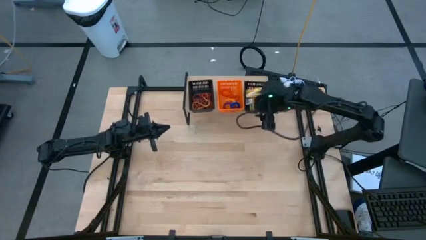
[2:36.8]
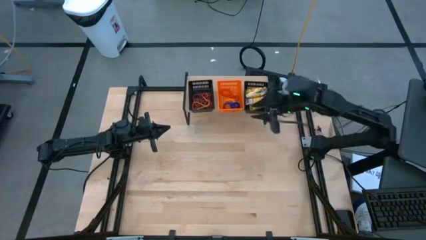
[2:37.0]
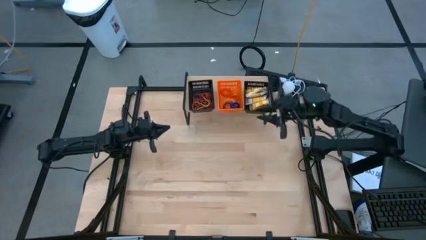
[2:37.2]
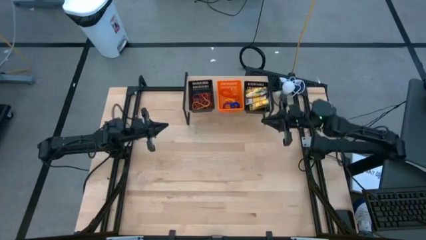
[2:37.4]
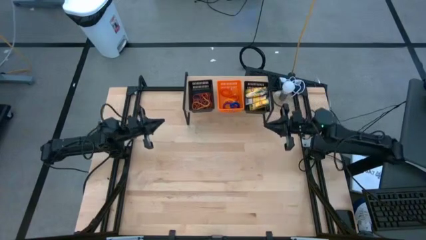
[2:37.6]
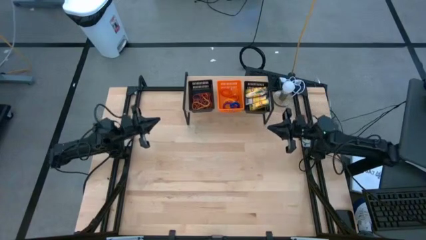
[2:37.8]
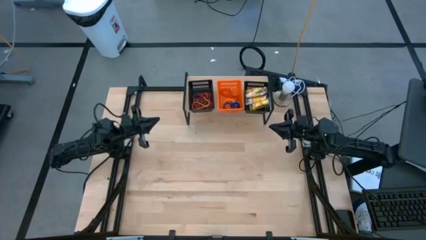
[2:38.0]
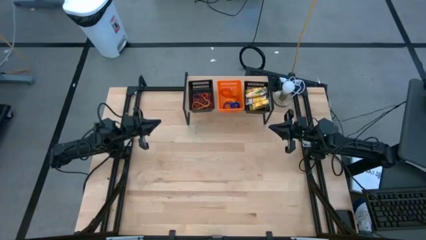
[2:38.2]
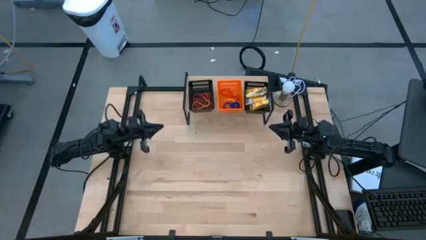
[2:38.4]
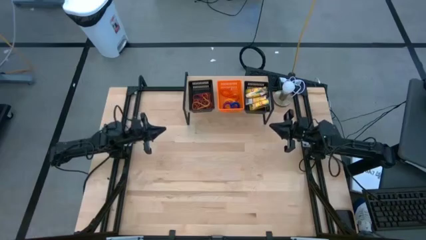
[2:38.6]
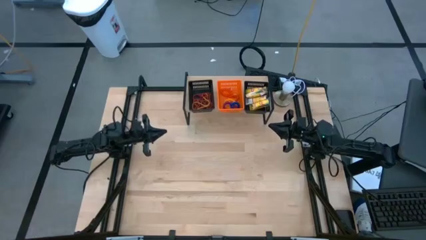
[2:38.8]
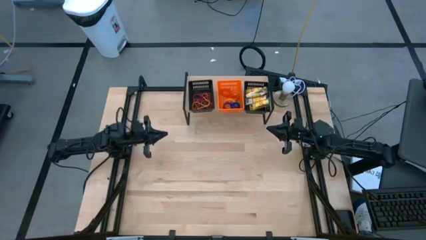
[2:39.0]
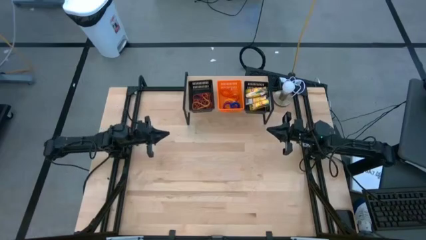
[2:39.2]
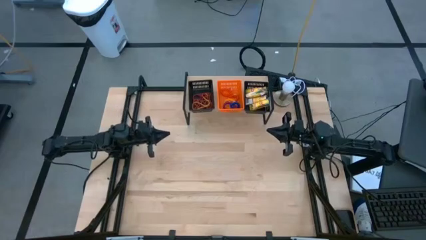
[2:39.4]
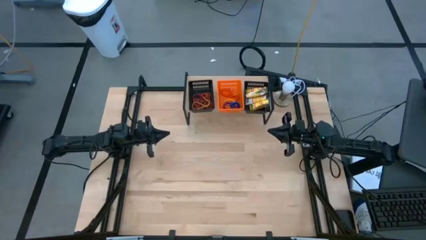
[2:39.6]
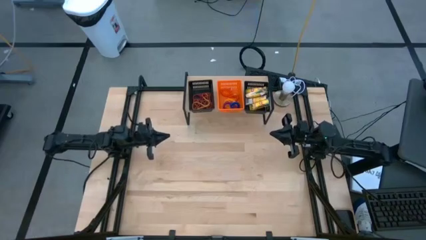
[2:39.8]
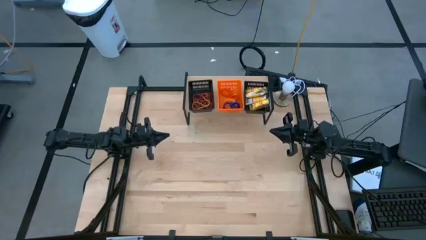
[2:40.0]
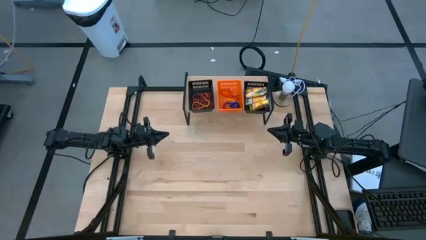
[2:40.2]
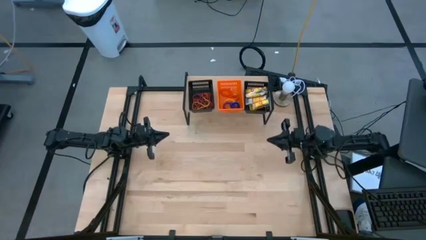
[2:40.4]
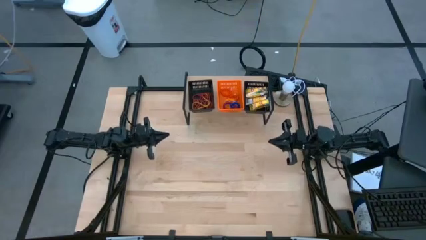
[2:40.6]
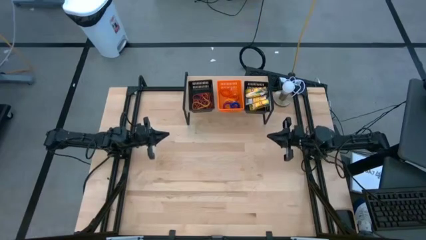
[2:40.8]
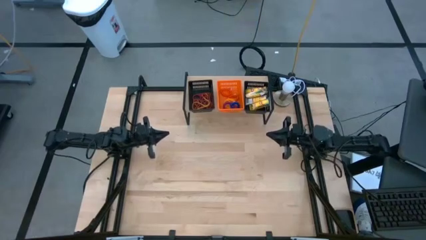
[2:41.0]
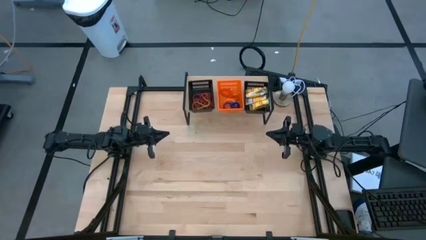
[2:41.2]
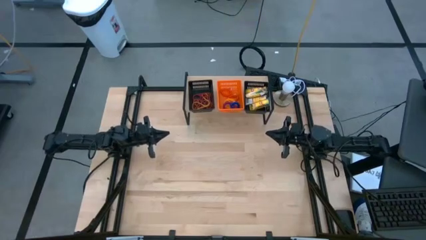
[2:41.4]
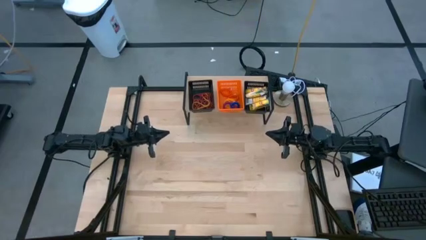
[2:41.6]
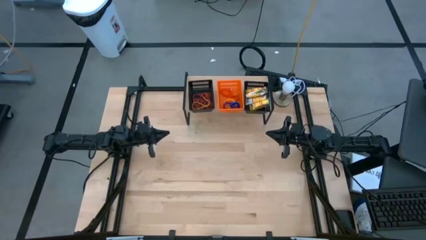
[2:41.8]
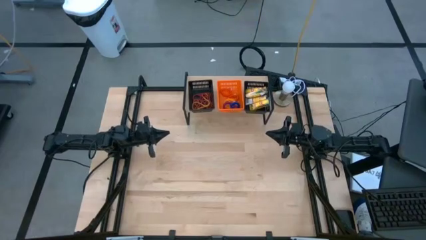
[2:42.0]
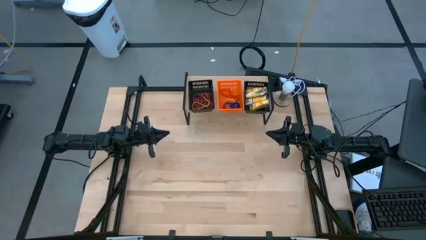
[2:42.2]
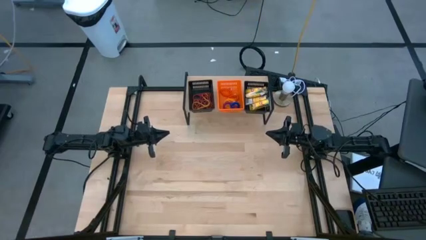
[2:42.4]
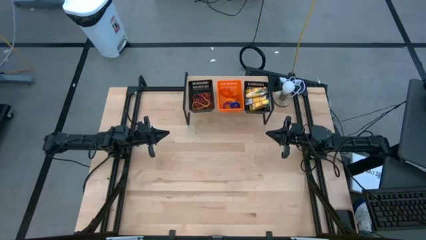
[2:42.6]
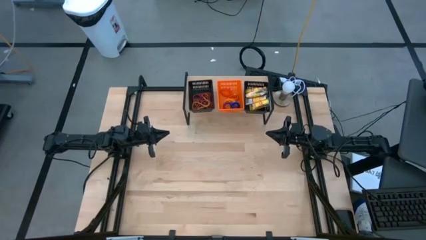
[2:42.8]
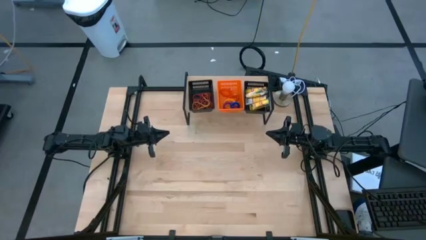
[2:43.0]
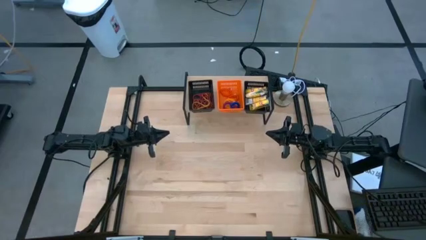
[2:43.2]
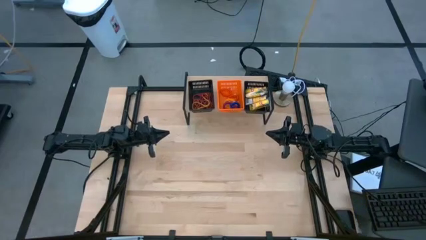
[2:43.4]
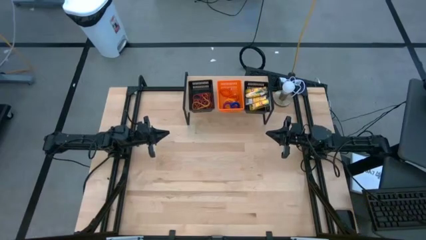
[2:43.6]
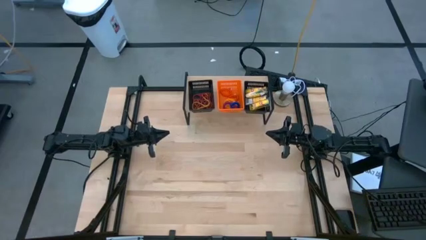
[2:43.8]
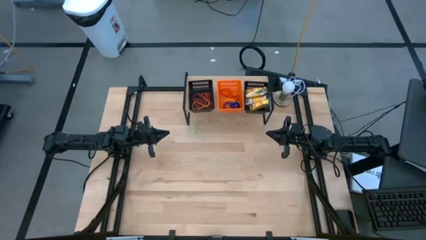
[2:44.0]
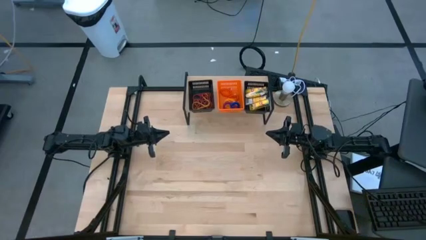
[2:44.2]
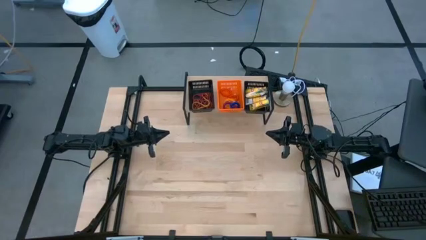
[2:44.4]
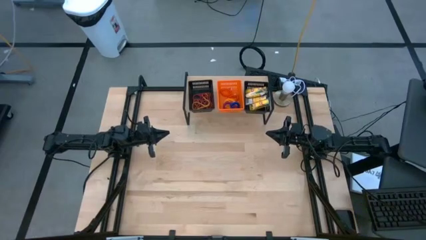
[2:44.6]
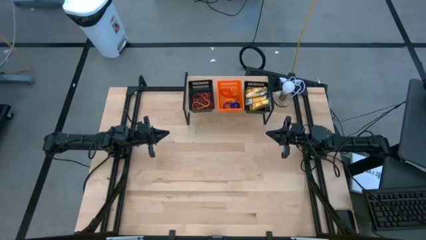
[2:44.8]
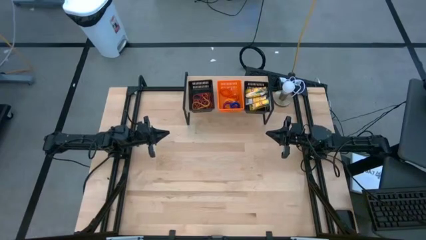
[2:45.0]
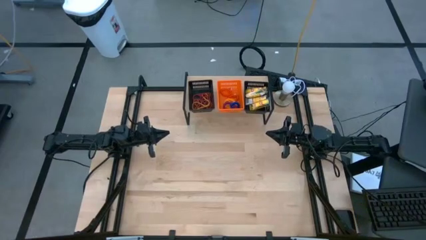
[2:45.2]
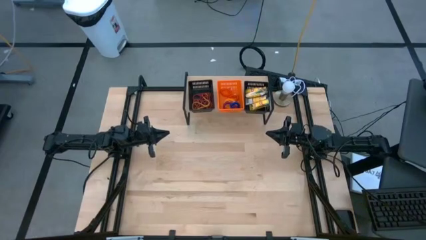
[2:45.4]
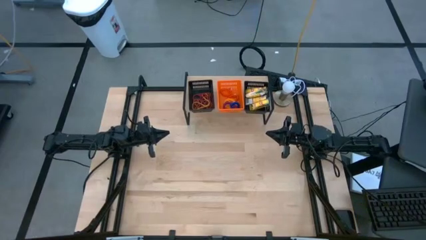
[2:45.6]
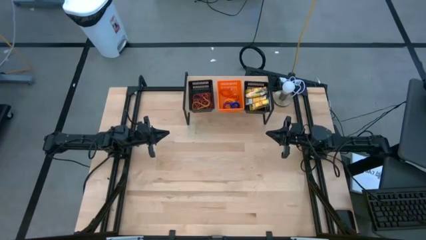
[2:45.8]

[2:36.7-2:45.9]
Task: Pick & Place Office Desk Supplies
Return to Home Position

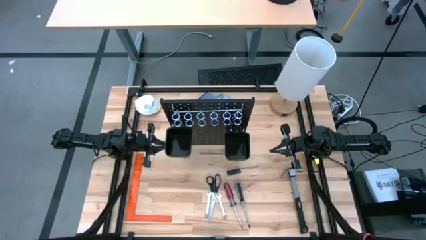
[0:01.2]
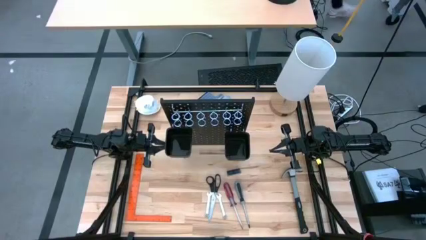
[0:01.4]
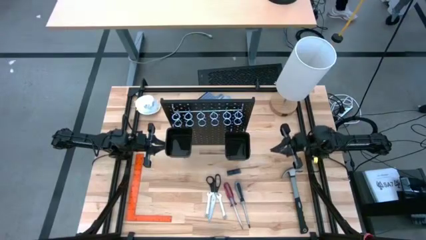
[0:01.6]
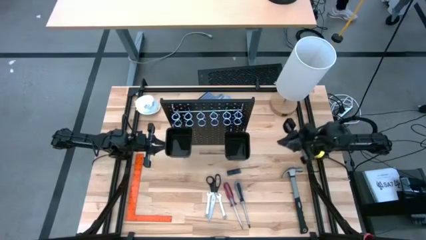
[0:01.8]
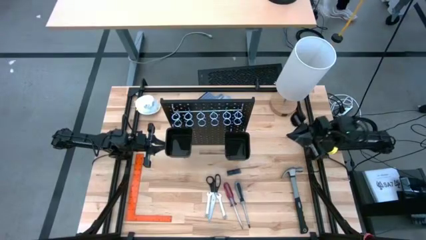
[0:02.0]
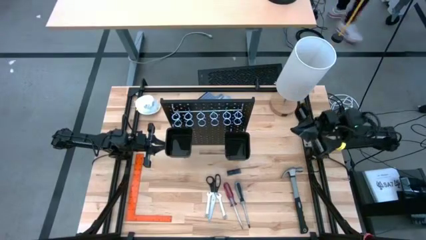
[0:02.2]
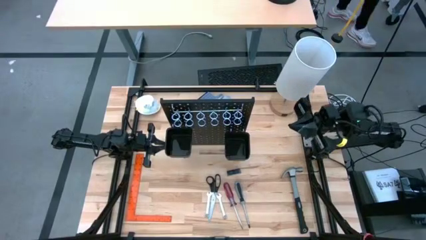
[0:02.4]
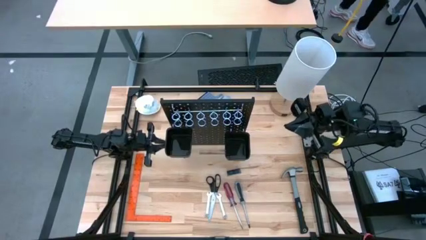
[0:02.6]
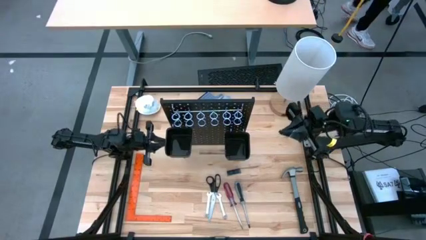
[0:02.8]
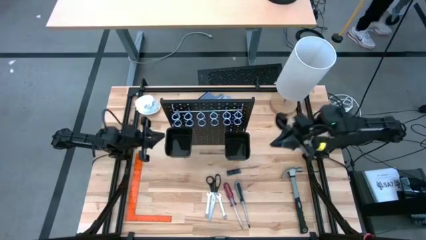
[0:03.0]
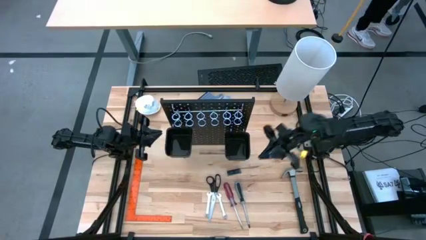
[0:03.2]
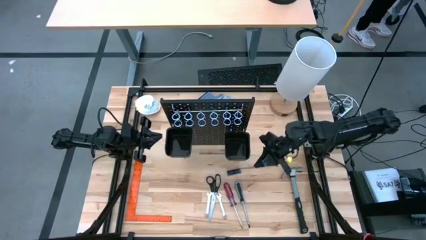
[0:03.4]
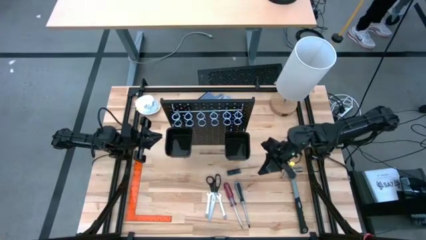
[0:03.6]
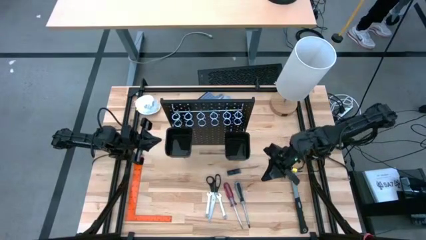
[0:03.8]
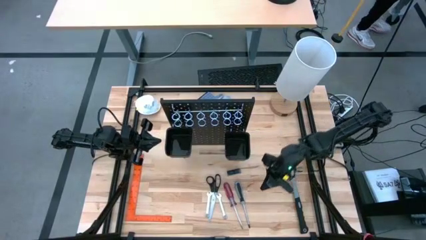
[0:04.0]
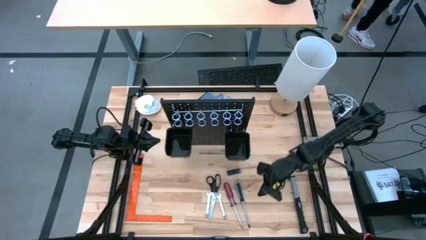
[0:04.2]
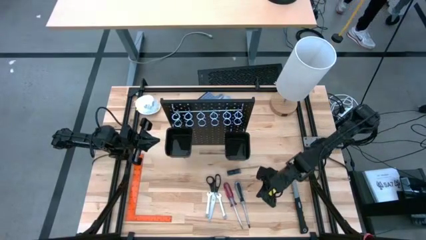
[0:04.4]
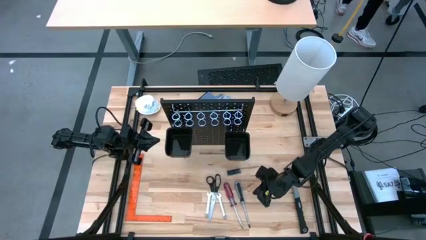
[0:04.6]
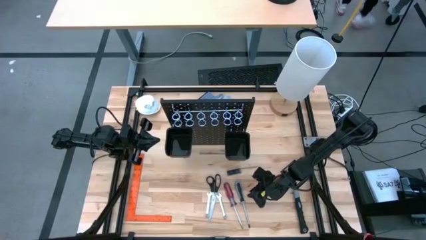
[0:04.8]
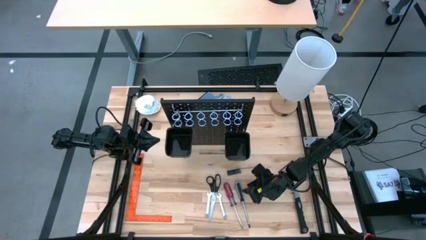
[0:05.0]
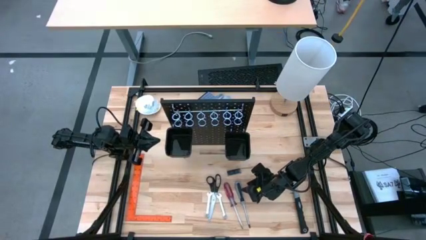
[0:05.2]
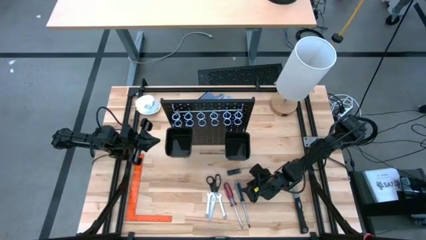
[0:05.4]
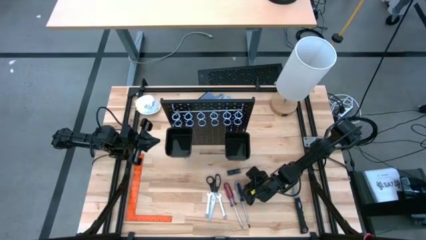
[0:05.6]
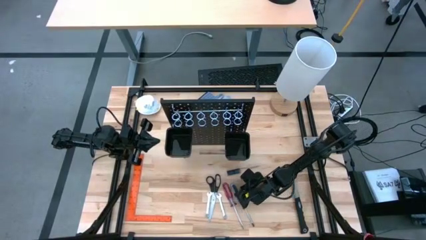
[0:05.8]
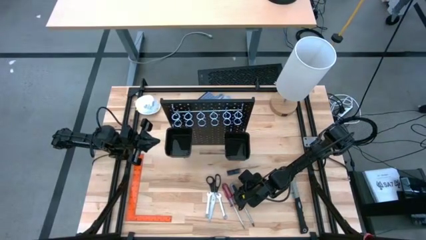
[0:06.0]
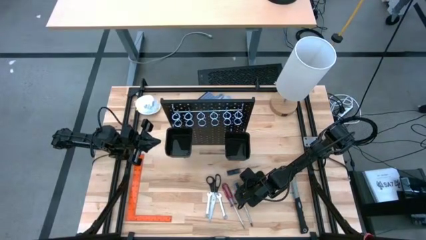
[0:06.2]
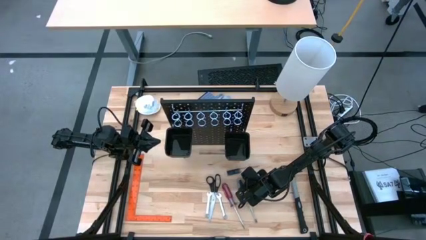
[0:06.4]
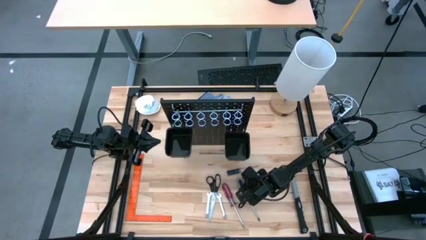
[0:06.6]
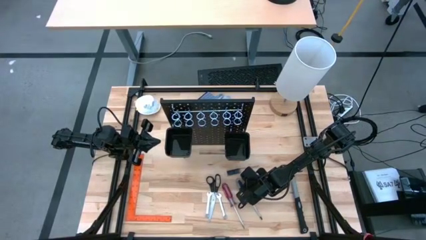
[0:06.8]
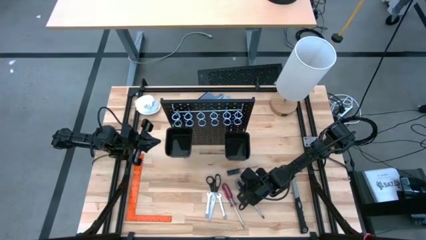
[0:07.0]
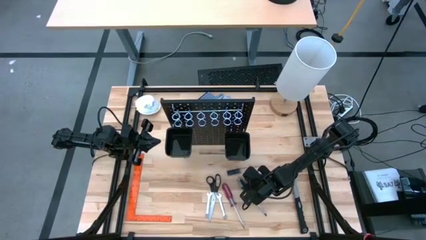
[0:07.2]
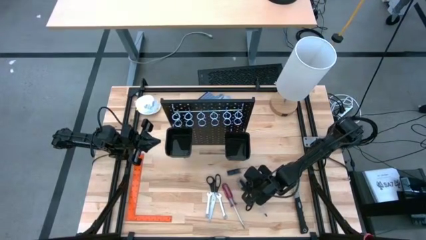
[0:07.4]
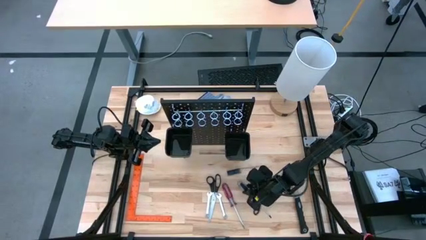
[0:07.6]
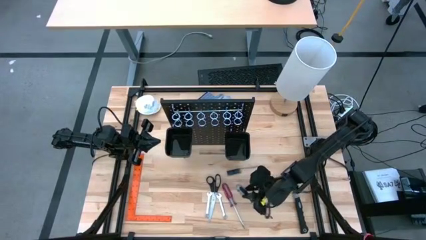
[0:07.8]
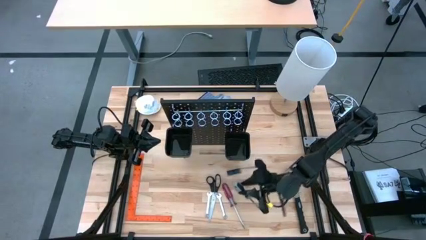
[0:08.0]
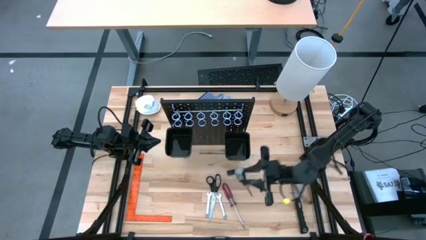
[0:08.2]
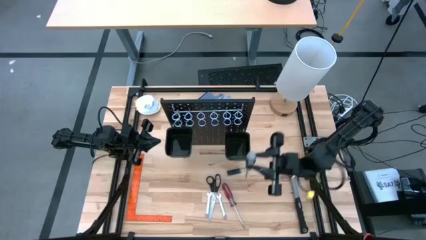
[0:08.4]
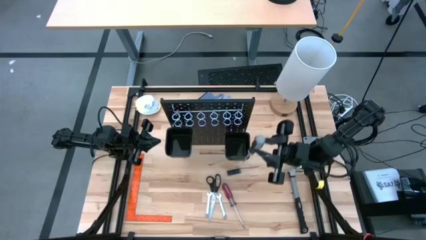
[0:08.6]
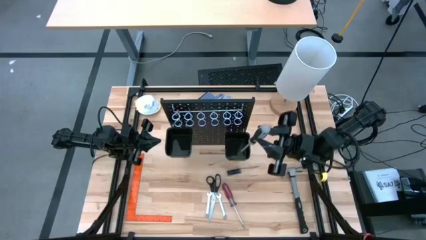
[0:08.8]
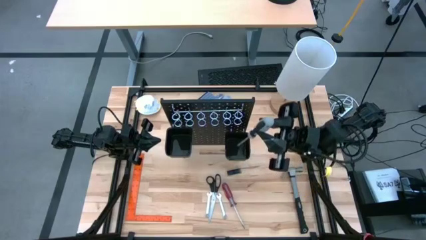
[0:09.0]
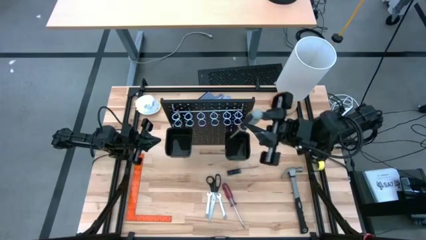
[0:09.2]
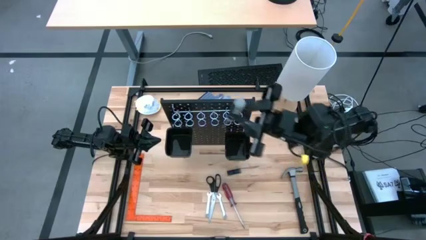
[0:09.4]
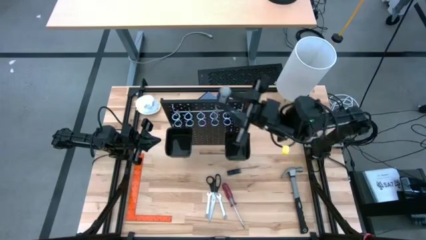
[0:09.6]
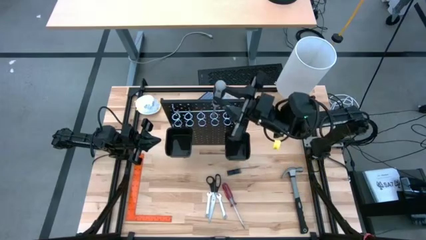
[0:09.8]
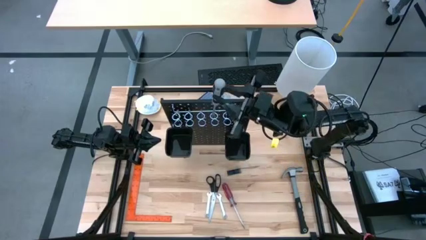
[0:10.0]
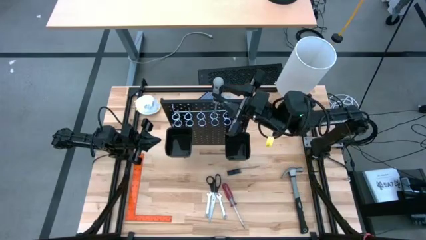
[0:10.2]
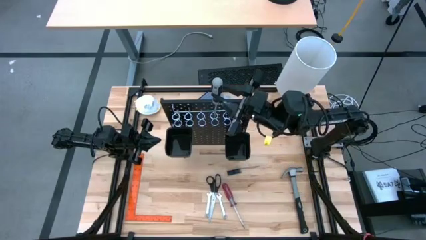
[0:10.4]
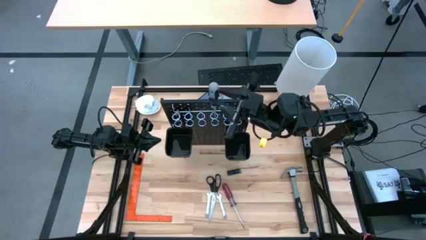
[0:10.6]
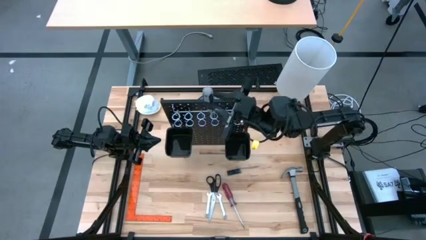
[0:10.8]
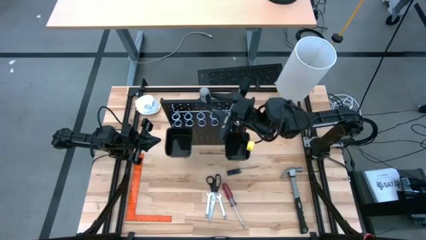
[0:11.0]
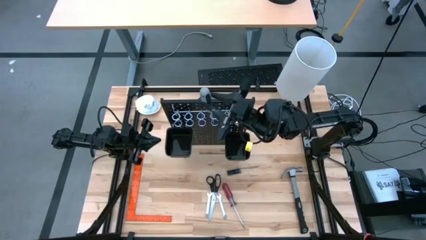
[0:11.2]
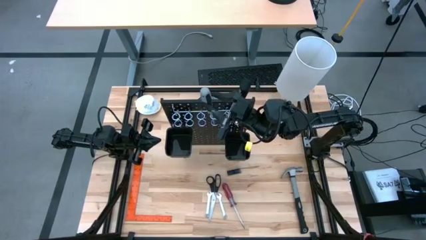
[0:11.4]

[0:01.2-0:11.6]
Task: Hang tools onto peg board
Hang the gray screwdriver on the peg board
